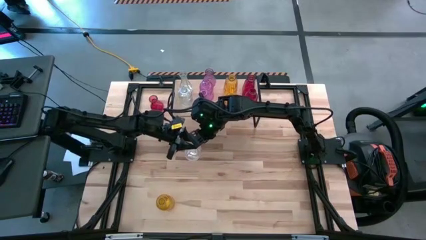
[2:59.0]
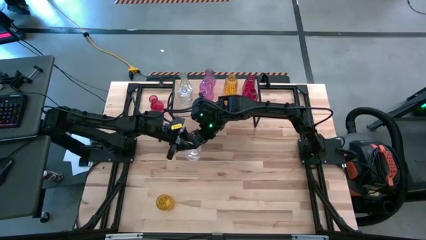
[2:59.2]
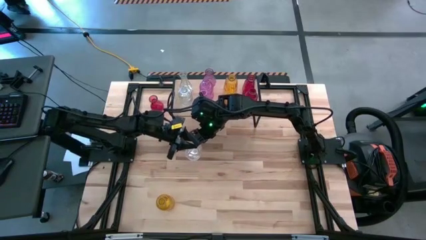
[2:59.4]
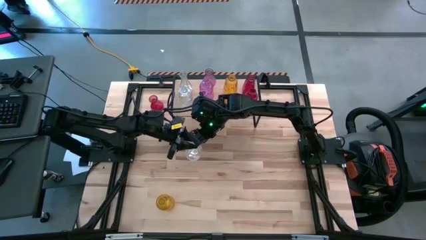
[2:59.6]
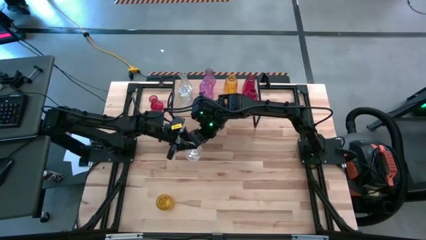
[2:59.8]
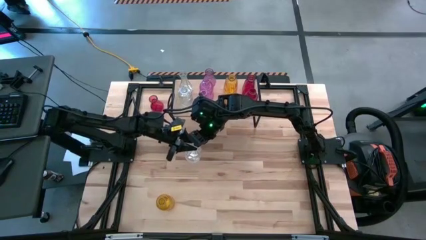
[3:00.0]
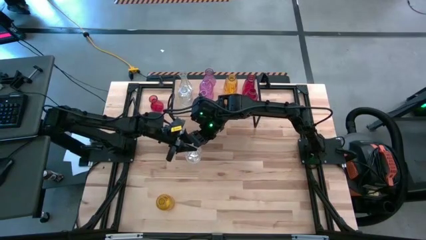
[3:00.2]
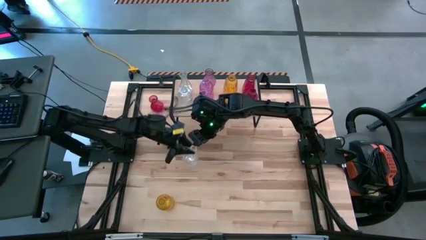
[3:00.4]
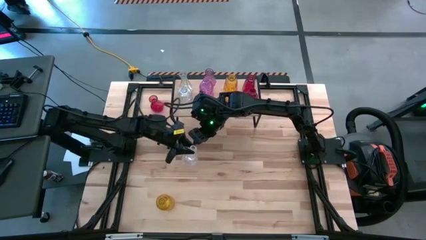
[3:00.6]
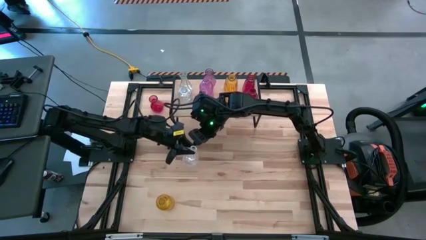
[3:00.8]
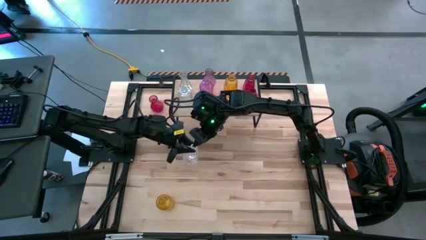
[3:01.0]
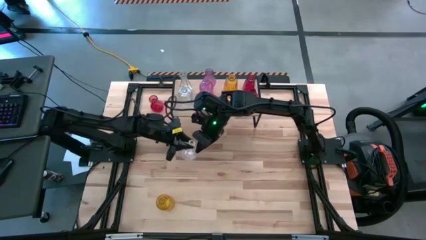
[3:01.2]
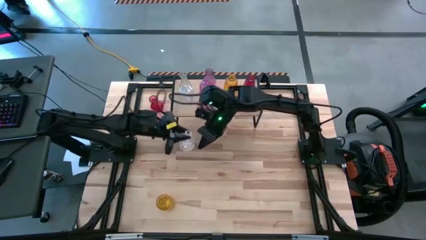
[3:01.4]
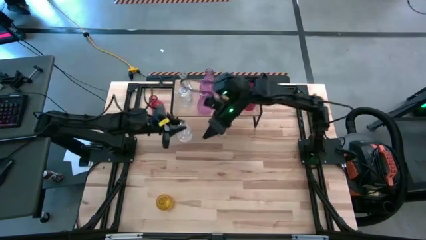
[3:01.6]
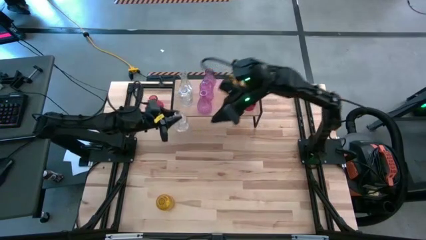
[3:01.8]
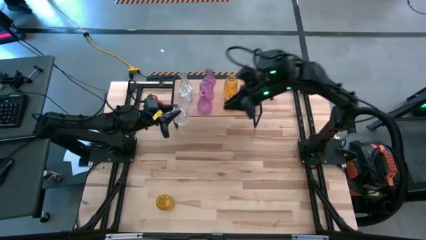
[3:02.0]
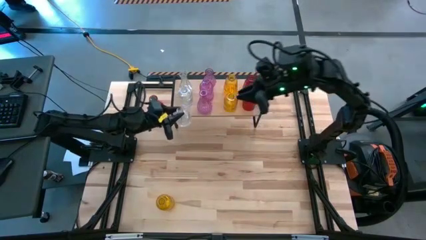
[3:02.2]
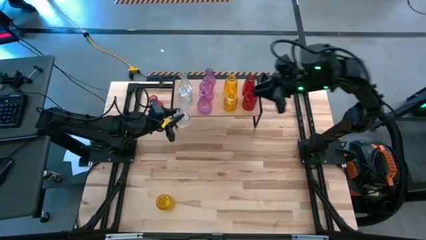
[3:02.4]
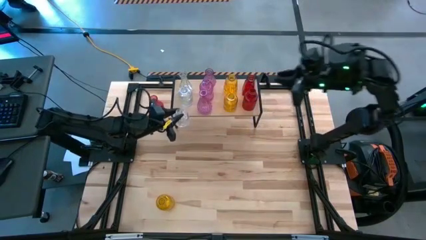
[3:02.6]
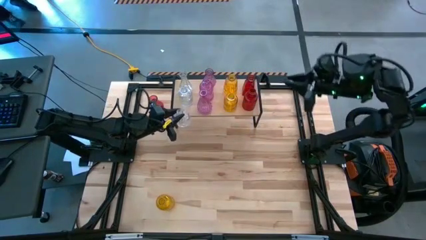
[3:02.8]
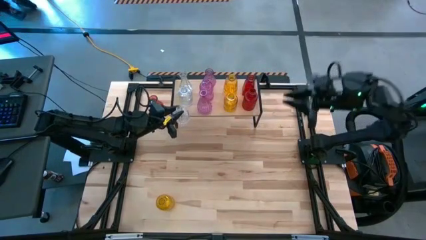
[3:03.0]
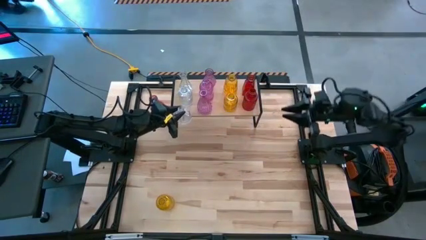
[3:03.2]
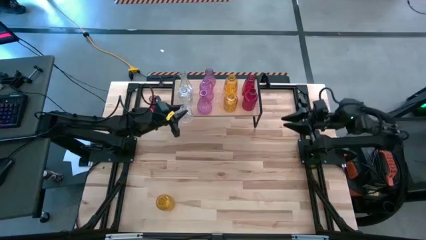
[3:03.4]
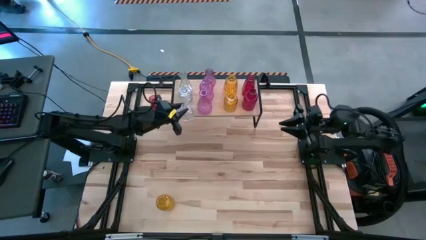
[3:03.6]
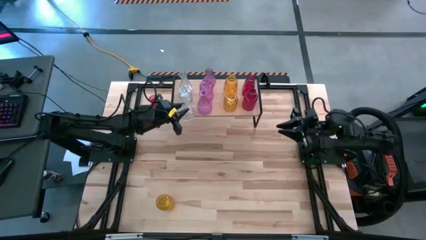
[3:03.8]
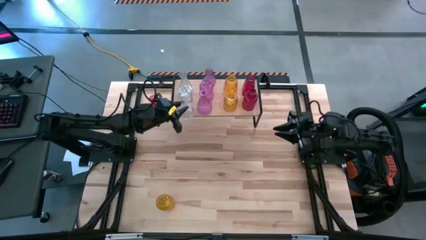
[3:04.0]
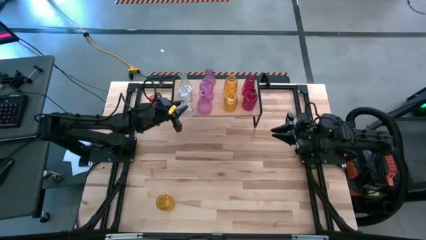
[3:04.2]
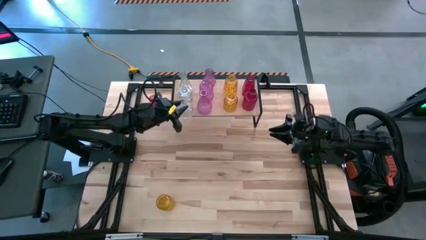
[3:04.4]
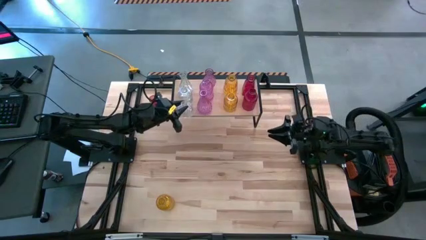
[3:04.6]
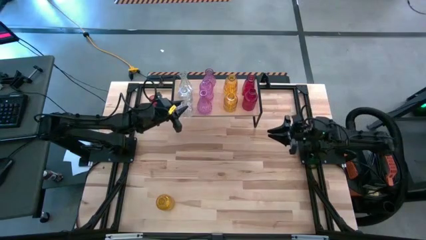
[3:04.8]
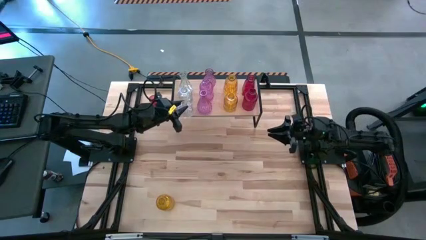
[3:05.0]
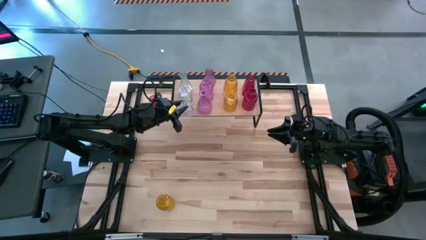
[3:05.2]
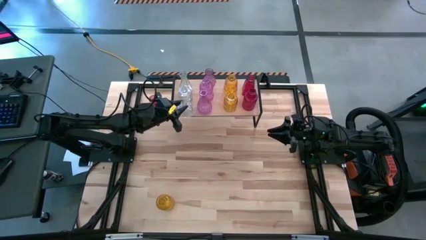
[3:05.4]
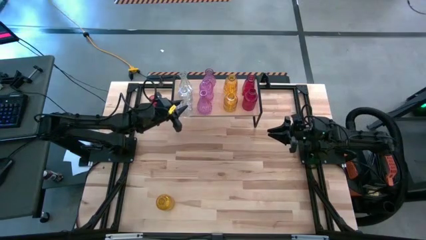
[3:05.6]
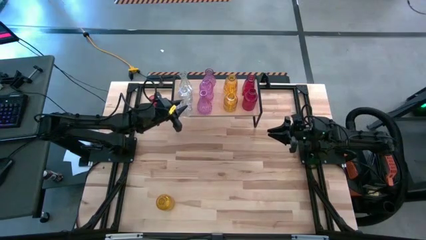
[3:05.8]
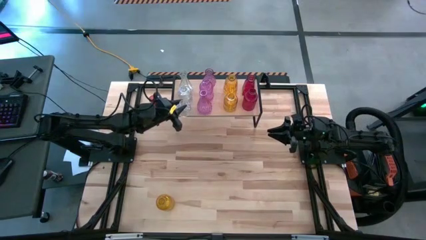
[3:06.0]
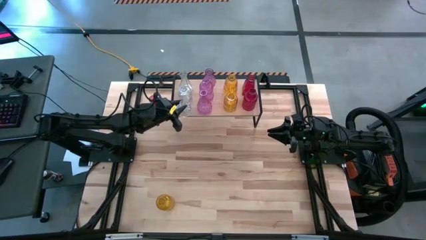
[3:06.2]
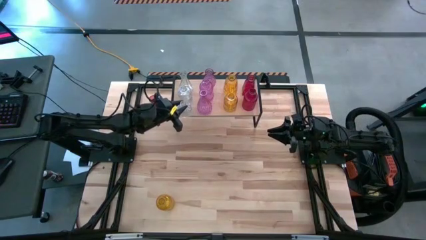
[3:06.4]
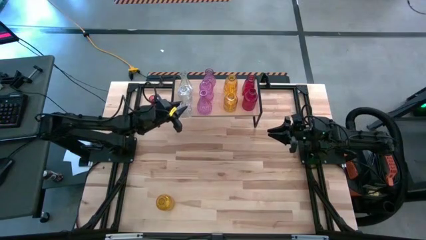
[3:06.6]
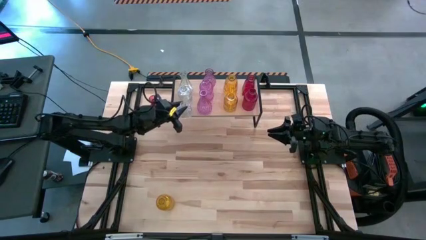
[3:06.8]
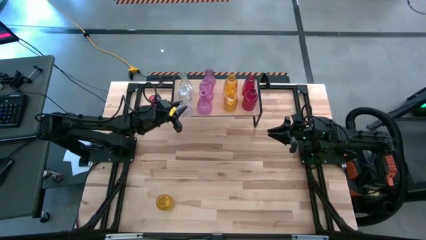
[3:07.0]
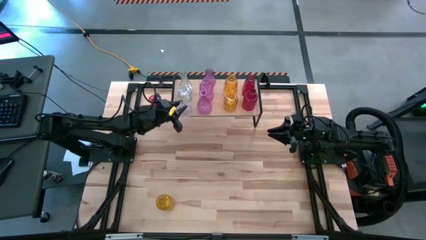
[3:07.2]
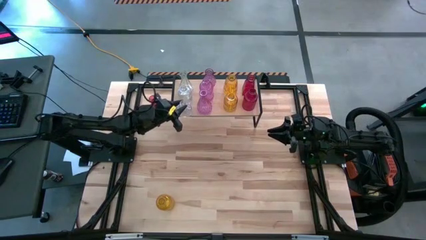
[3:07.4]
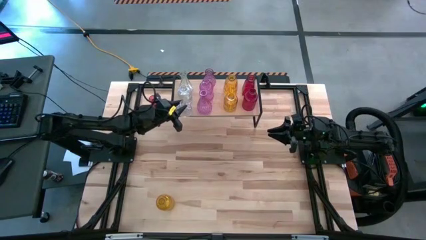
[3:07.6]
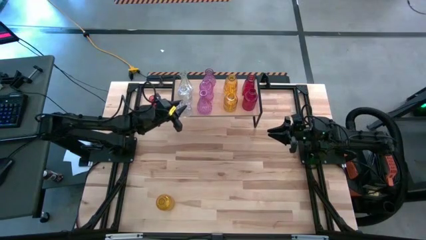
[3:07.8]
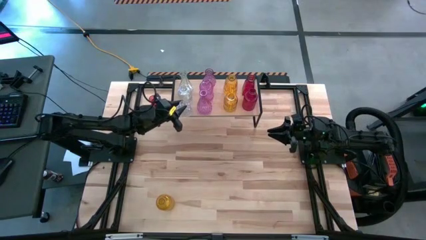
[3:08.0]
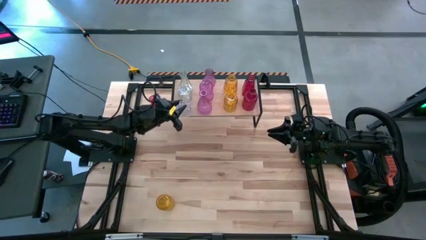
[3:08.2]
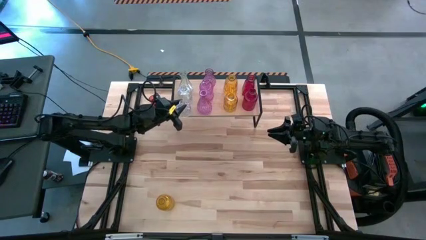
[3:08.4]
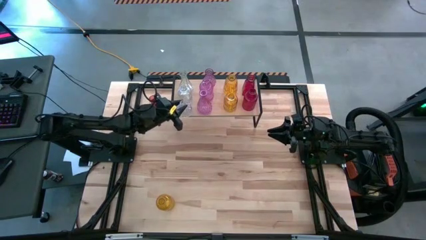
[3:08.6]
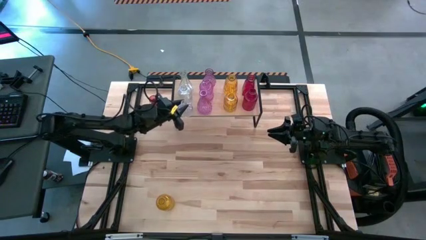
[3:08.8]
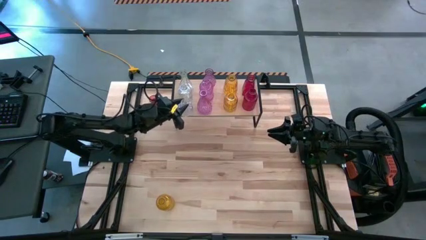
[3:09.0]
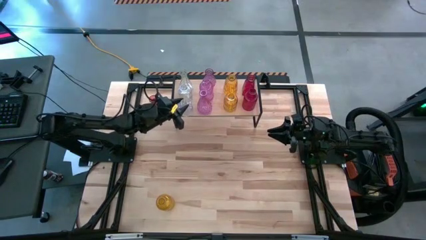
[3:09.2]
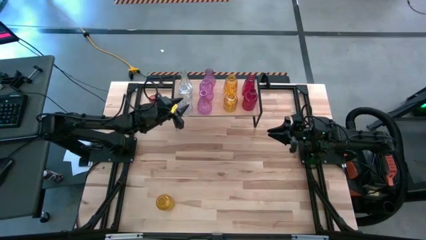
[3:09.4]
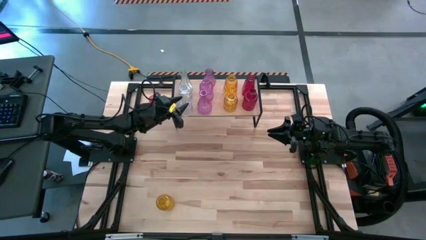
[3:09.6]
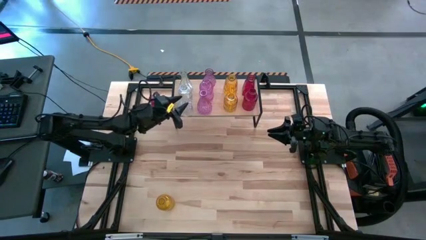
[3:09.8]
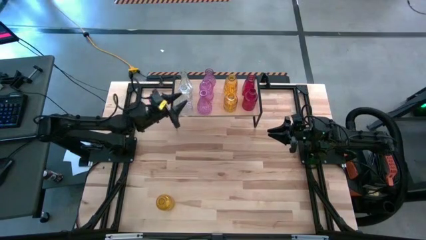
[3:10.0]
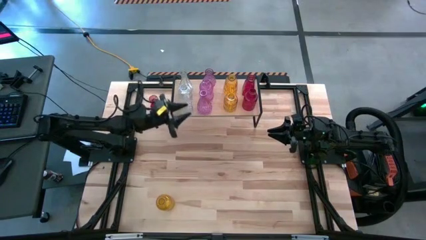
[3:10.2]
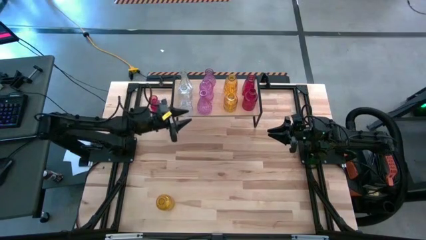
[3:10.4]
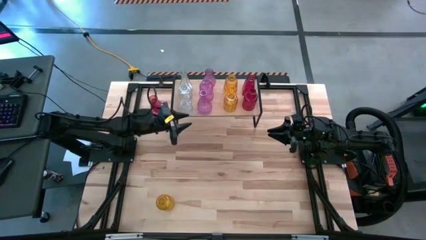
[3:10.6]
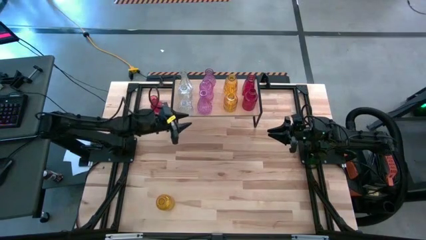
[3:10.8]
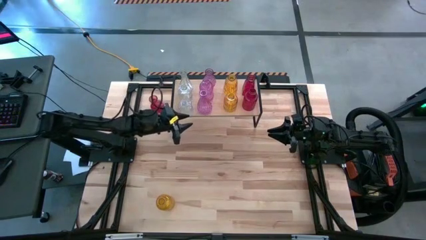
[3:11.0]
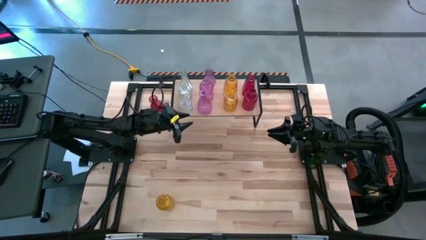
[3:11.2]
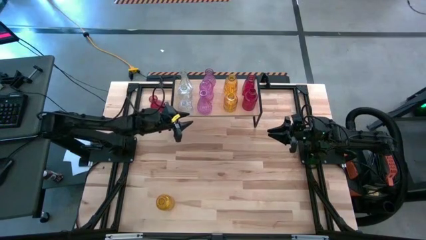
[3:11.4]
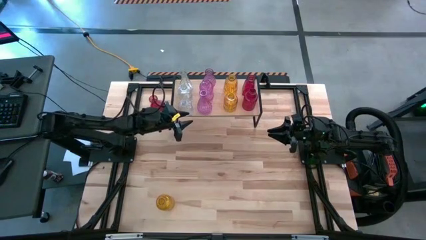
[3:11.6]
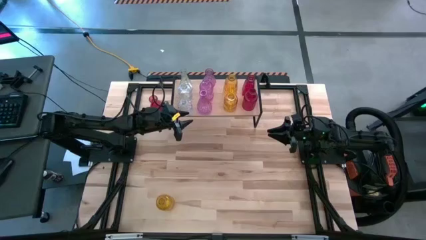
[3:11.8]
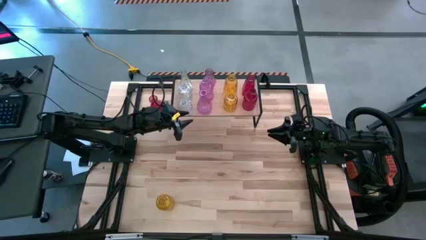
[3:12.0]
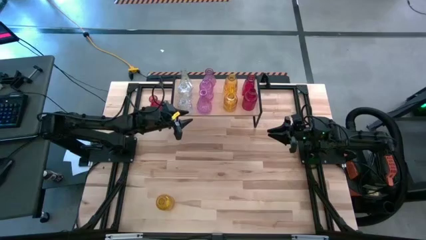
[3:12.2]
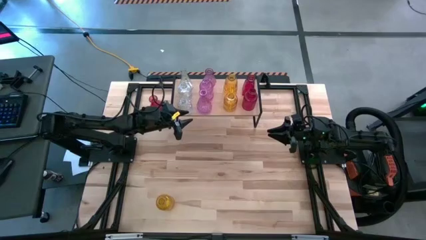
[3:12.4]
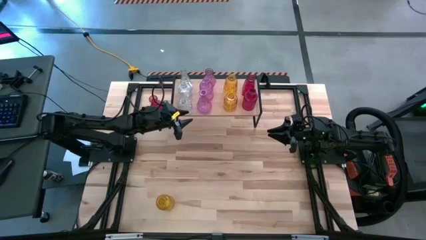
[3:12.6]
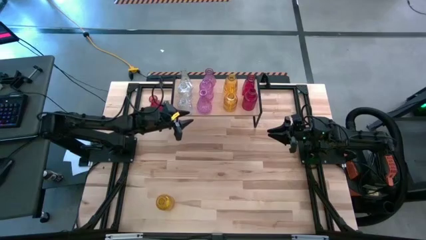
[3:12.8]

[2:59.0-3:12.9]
Task: sort vases onto shelf
Put the transparent vase on the shelf aligned with the other transparent vase

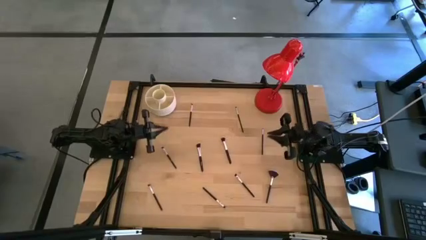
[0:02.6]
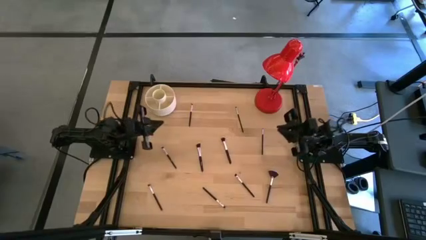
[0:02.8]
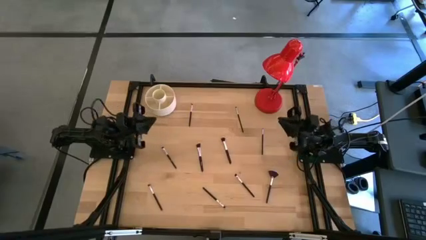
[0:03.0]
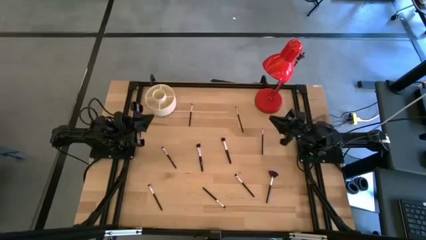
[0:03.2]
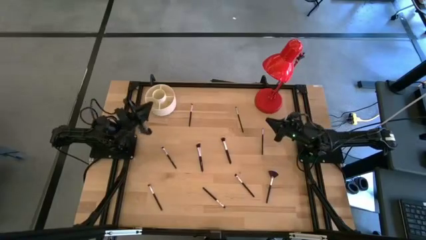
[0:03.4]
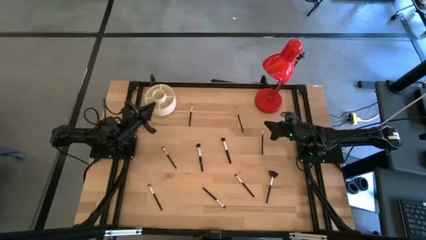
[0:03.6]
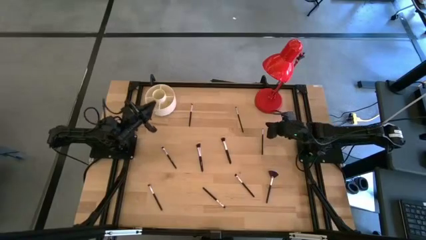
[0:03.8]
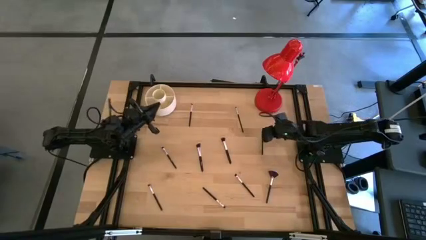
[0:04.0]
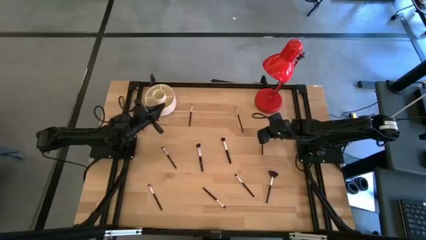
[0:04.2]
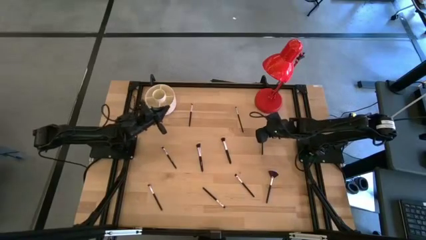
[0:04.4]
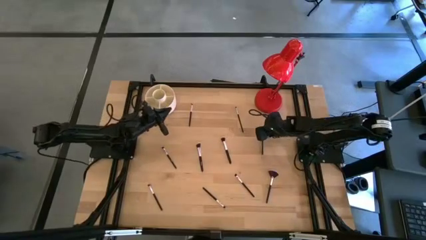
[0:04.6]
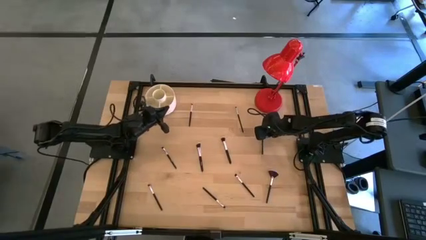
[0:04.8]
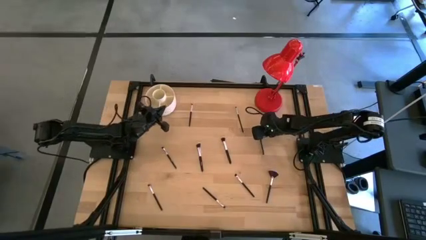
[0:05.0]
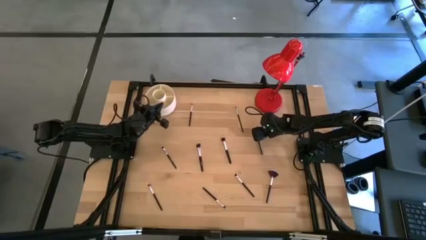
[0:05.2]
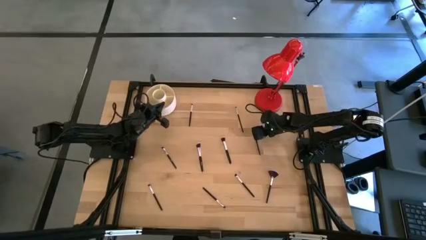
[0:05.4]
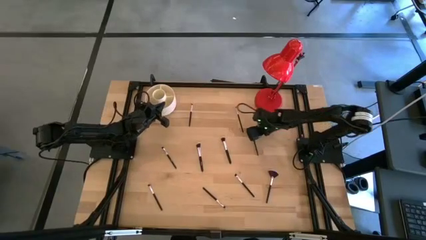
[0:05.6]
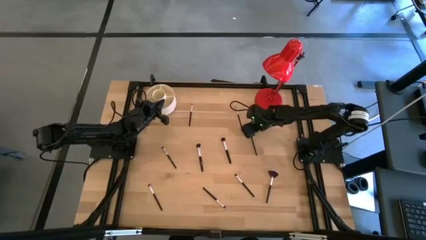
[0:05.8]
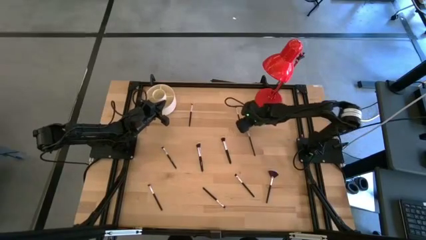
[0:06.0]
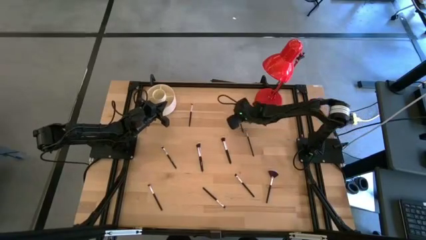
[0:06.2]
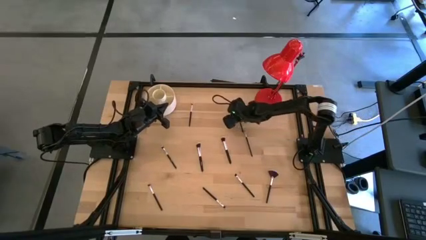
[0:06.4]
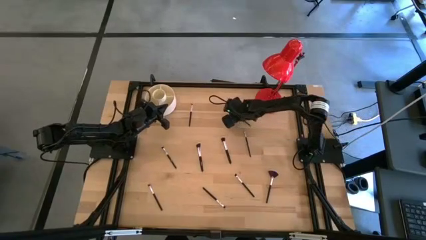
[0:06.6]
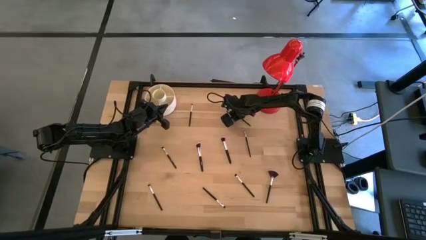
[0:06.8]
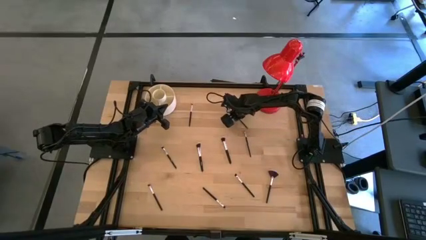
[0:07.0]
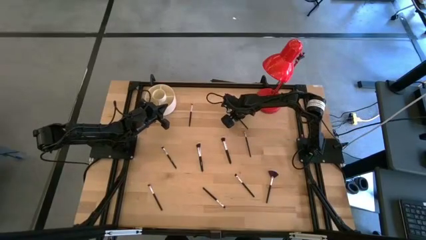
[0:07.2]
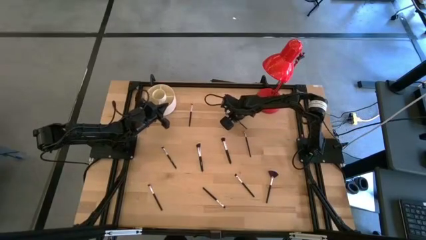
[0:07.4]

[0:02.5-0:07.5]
Task: Put items in baskets/containers
Put the eyeshadow brush into the organizer
